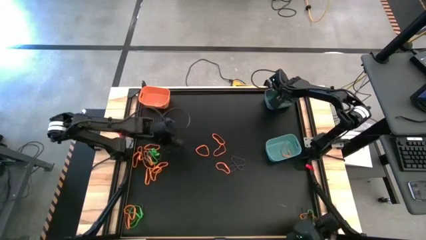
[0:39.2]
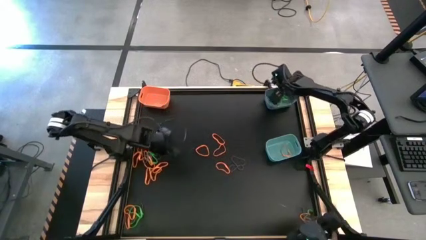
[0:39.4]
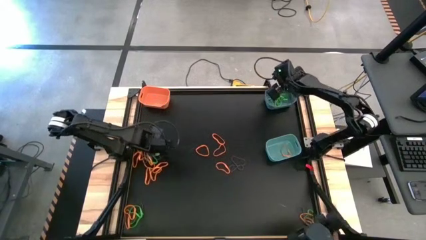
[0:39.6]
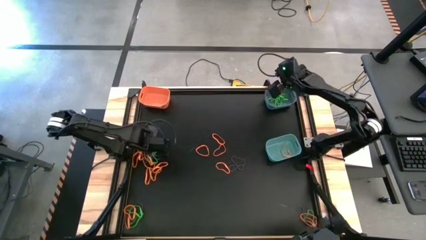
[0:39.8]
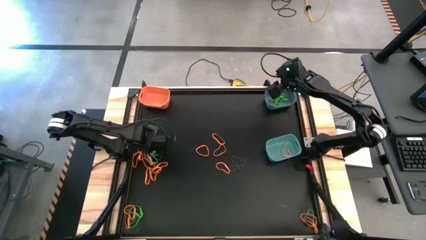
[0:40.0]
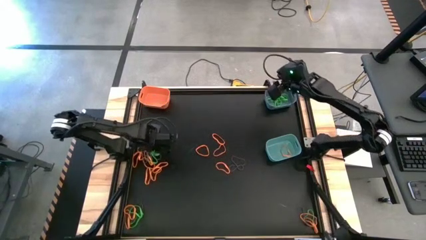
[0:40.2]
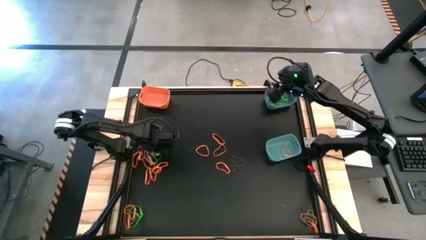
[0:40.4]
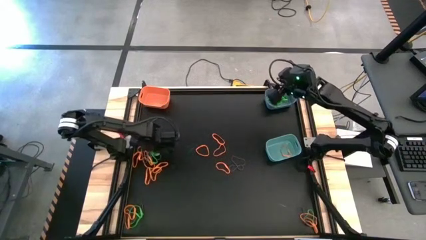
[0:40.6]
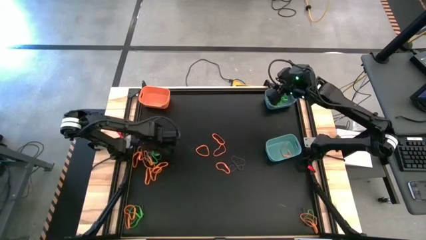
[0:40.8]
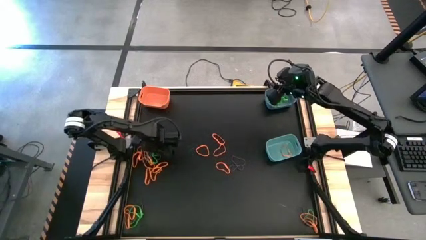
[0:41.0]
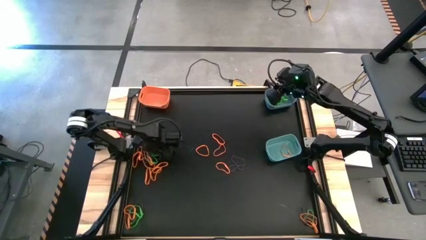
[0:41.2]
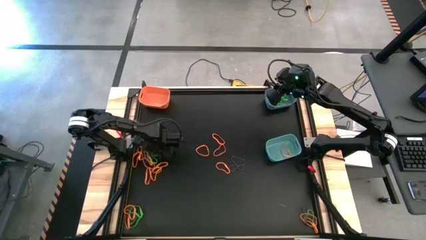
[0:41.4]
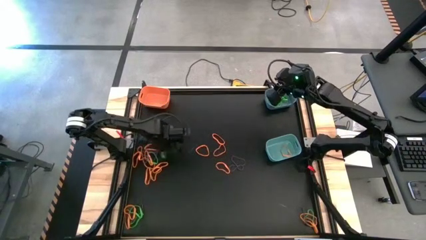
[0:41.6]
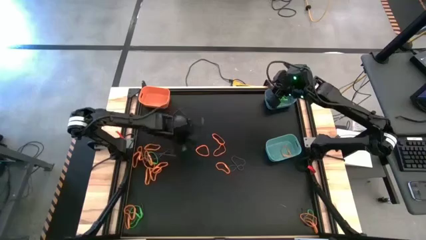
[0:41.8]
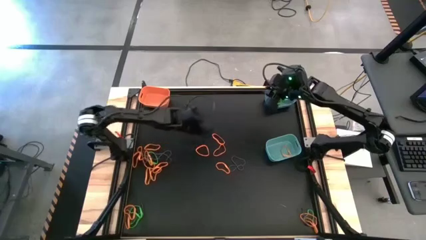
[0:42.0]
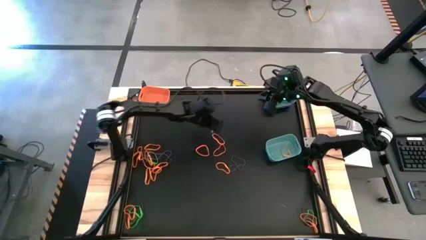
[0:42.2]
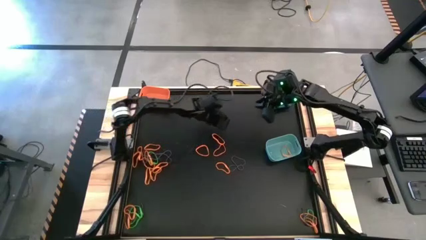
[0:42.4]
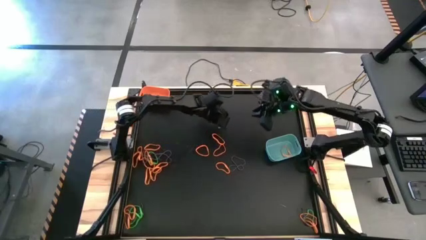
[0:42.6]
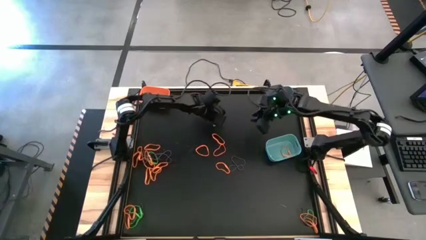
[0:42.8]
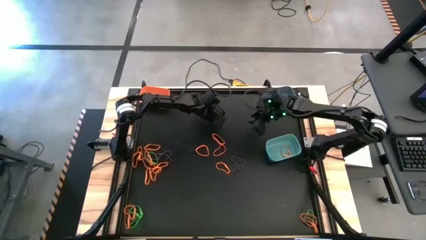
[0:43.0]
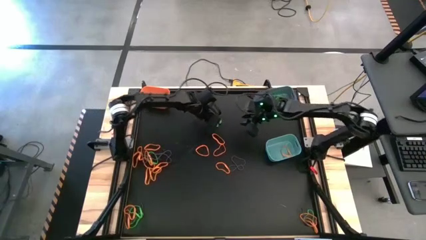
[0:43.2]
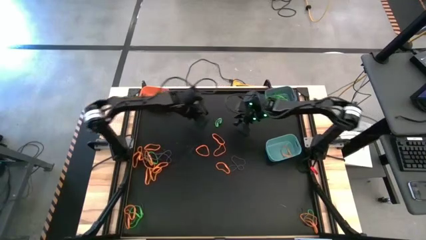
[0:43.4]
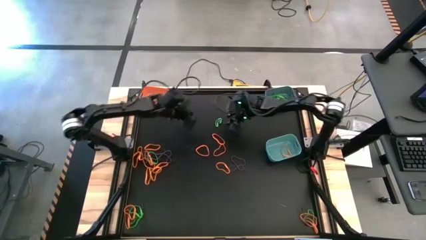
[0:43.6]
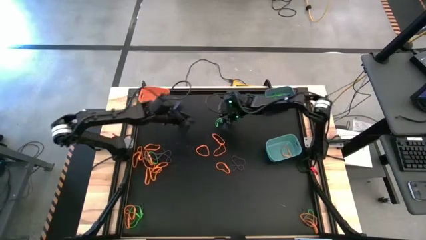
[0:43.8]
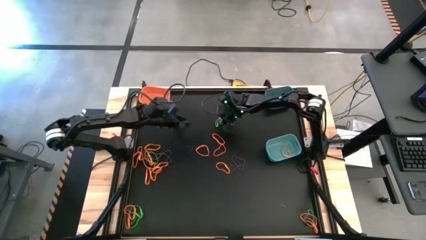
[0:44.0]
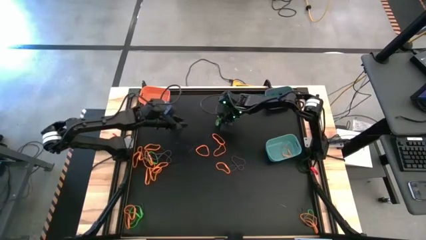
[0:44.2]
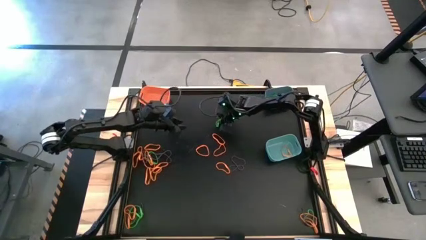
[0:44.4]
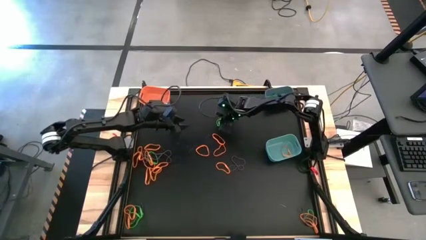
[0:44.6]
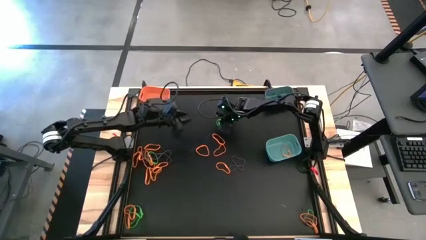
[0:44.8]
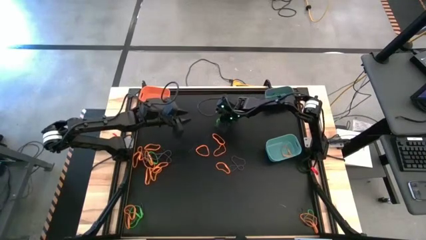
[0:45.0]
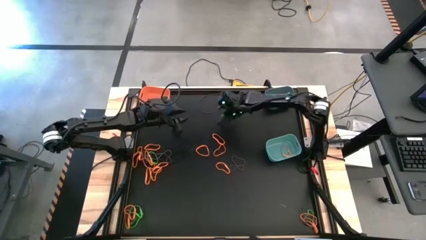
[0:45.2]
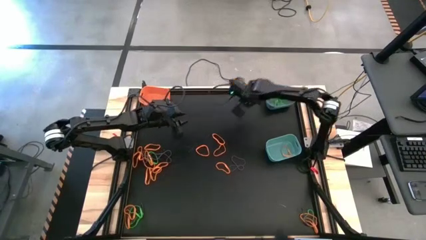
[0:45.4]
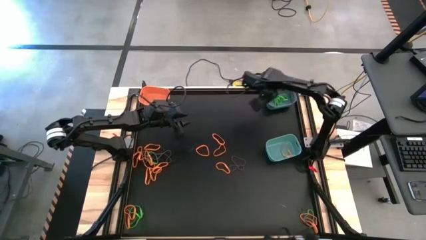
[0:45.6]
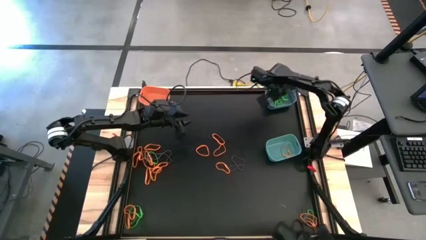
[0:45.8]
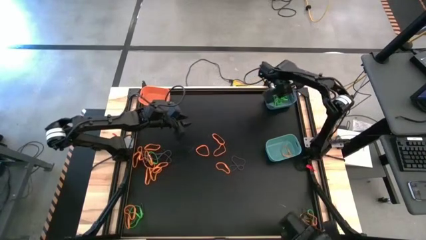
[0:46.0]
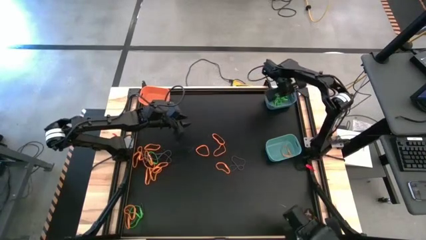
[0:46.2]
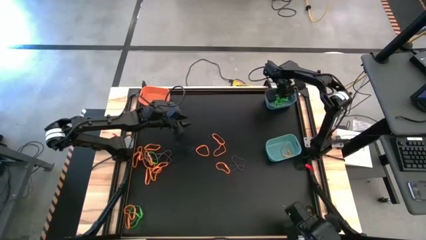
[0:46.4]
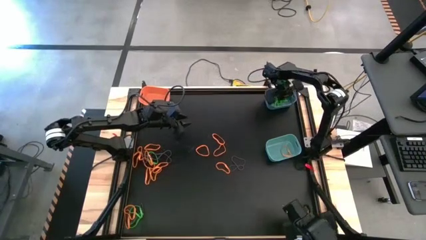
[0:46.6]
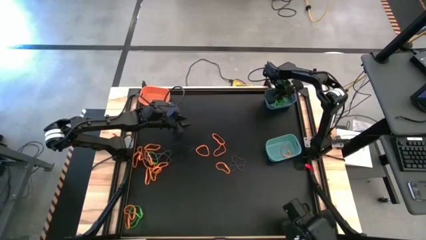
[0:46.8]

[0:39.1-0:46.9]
Task: Sort rubber bands into baskets
Put the green rubber band into the blue bin

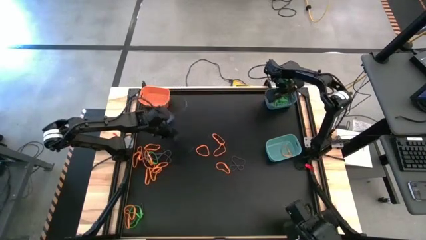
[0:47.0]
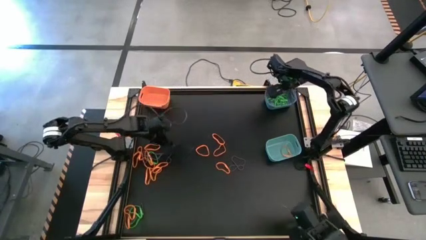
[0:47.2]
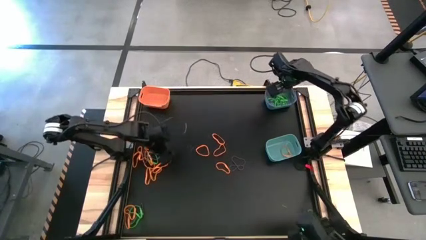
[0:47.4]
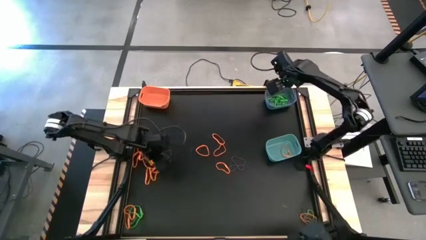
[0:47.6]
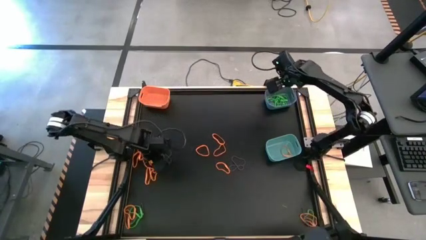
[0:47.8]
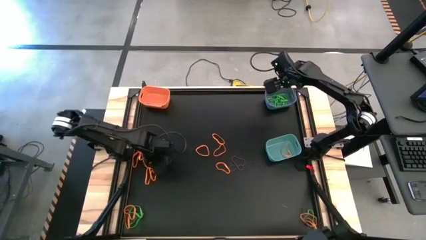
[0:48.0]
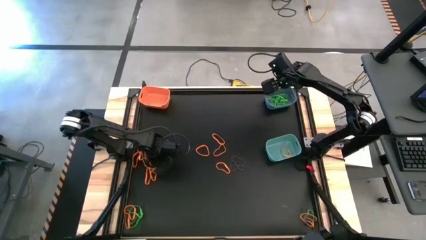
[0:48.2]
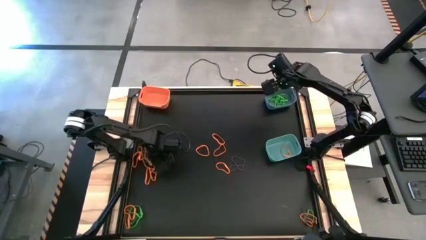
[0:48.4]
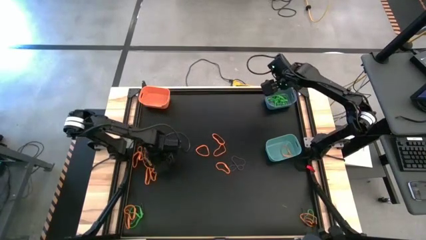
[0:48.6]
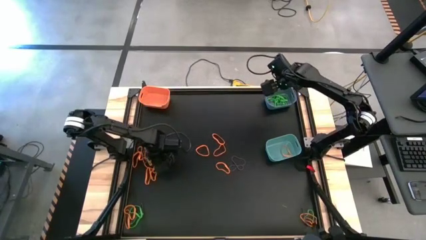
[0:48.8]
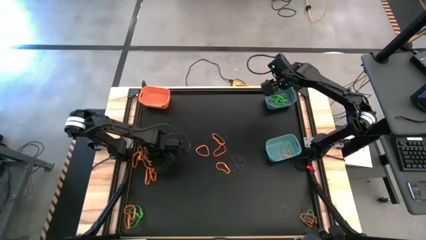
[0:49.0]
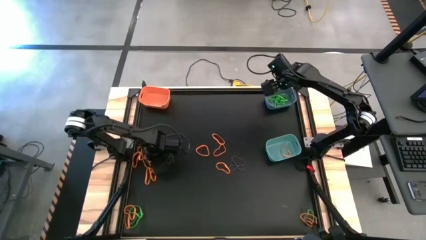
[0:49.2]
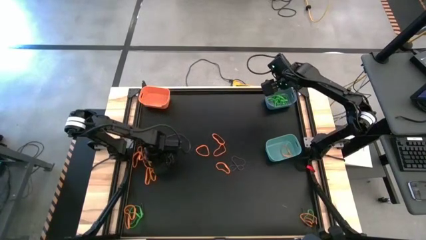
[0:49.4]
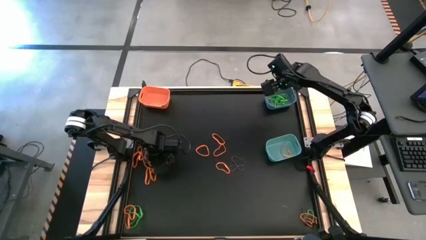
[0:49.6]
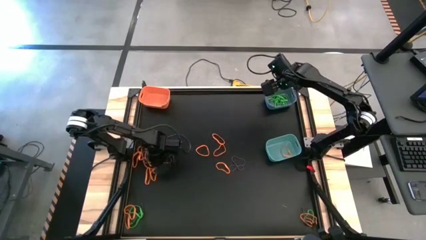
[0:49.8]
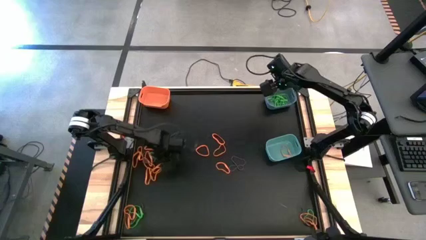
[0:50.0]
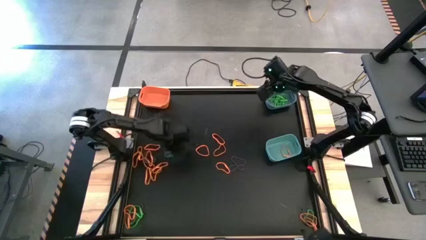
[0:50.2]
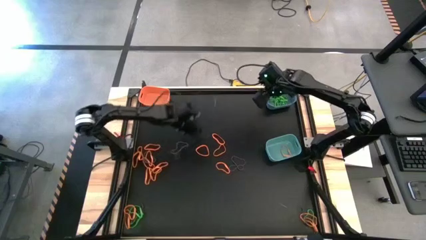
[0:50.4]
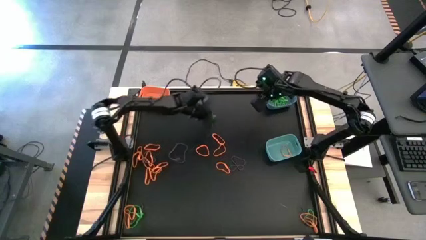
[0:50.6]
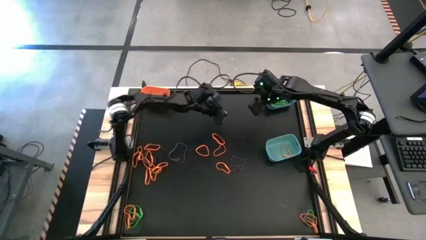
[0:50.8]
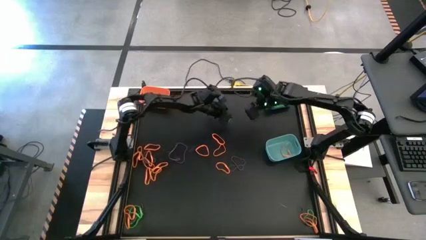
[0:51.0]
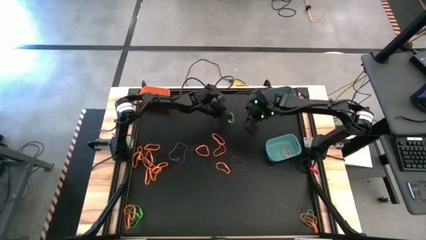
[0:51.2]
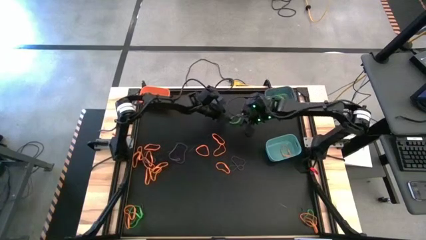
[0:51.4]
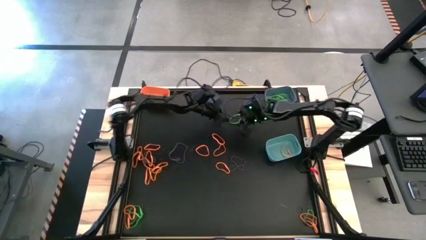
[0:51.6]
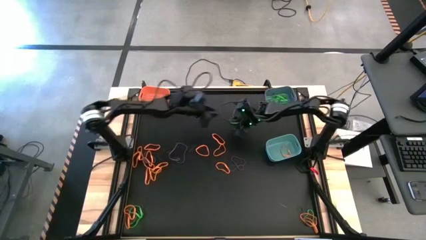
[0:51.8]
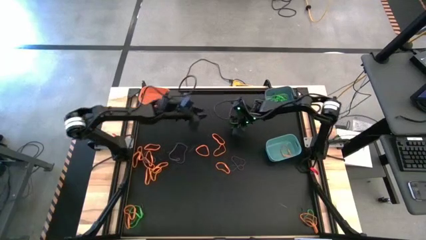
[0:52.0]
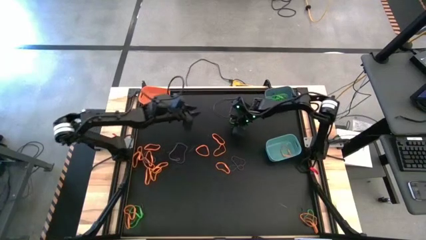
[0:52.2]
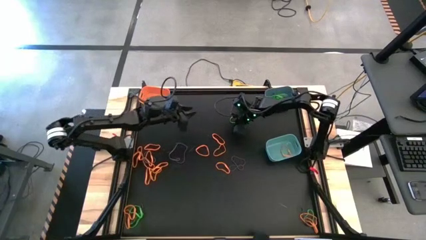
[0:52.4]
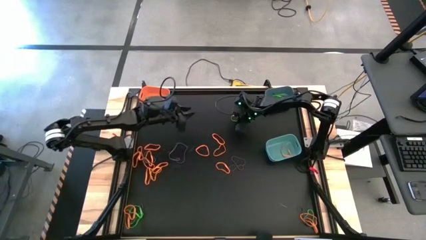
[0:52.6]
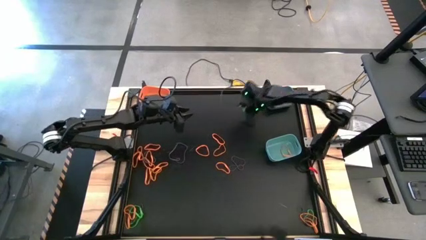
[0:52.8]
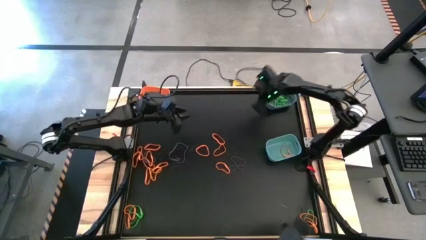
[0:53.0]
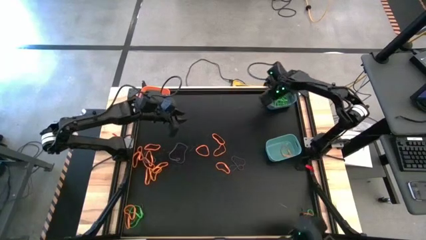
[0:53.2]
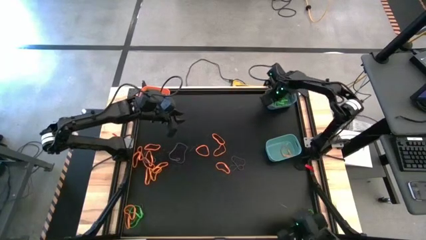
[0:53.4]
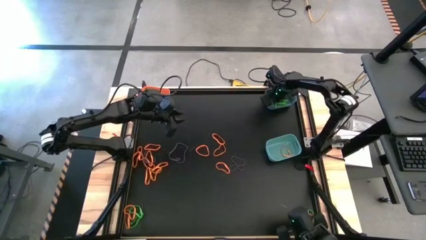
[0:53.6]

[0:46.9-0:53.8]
Put the green rubber band into the blue bin

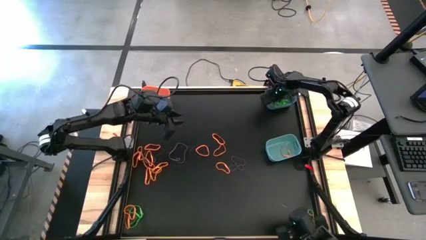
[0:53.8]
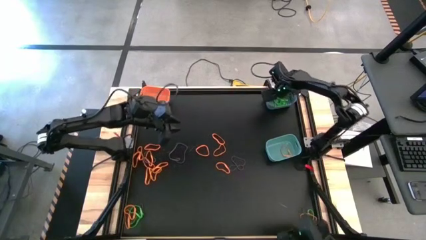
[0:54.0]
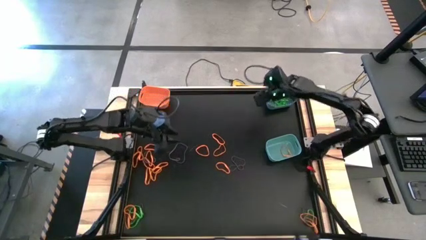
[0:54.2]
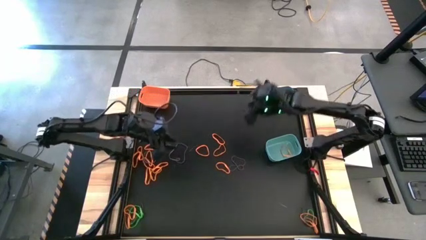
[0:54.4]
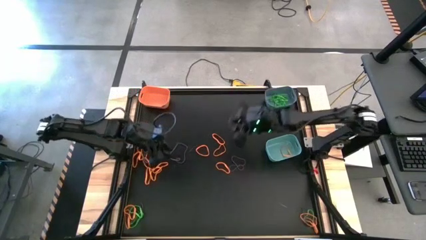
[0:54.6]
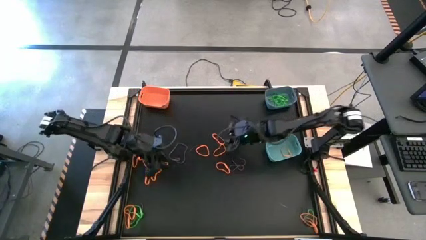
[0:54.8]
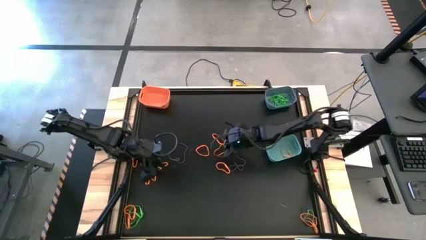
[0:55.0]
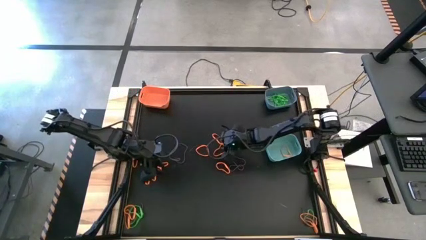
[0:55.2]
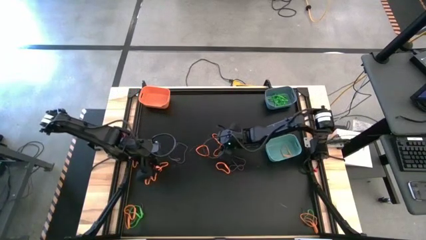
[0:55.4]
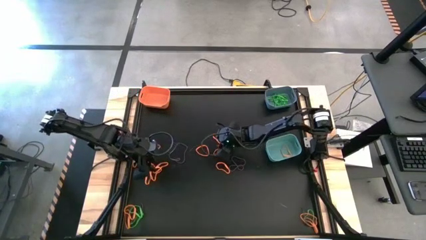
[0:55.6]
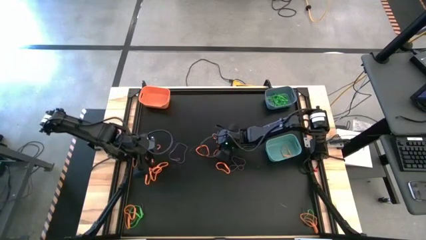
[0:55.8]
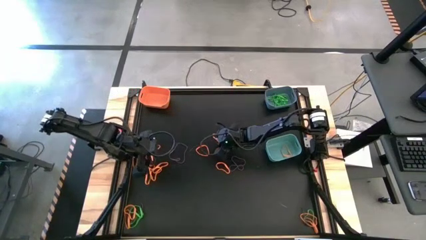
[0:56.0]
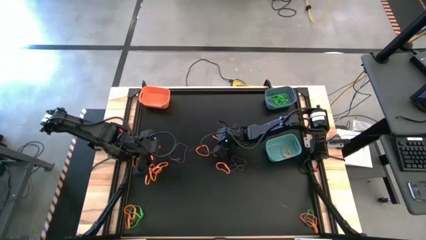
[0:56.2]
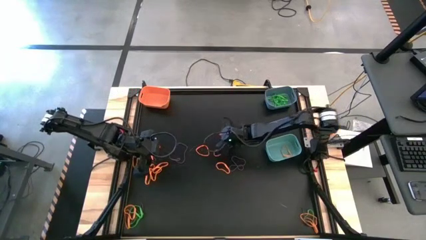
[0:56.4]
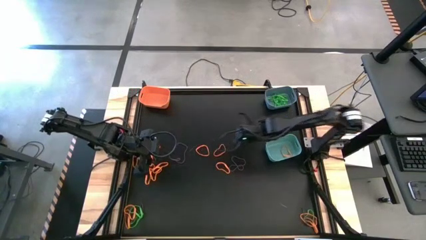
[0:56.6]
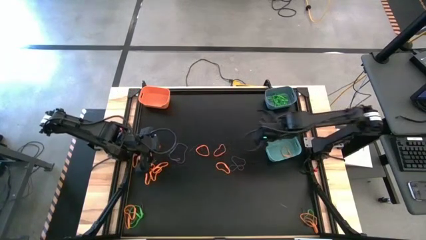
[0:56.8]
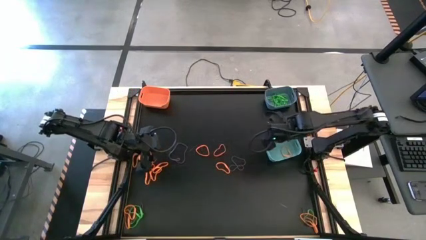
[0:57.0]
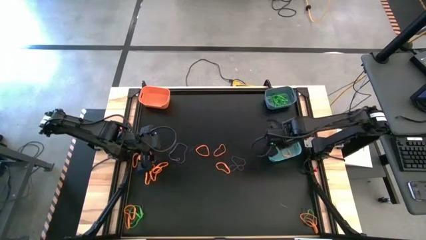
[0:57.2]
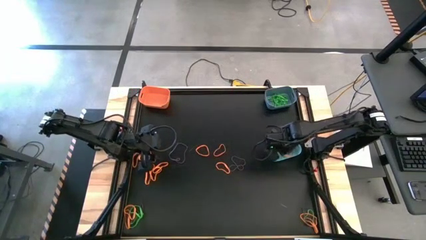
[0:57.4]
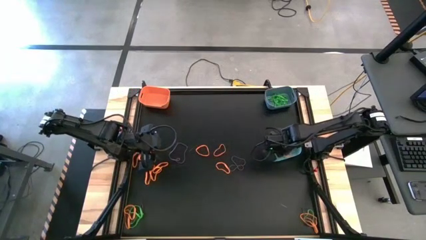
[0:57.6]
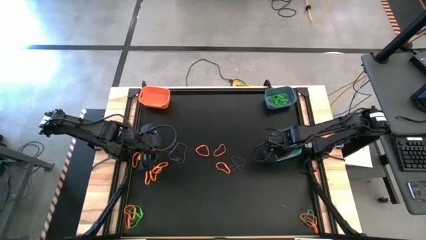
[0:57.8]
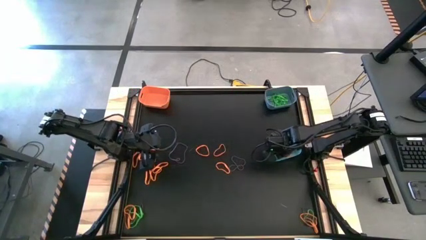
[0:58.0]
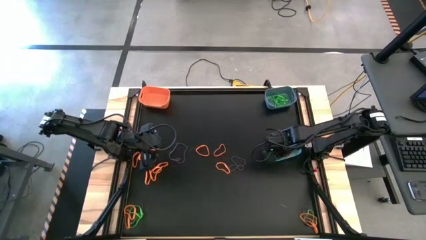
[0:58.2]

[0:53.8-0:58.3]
Put the orange rubber band into the green bin
